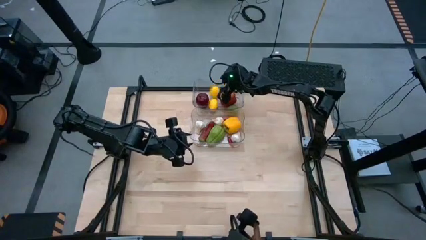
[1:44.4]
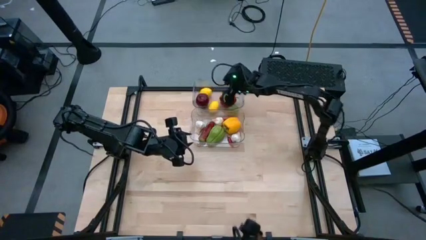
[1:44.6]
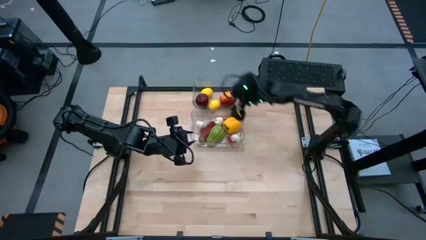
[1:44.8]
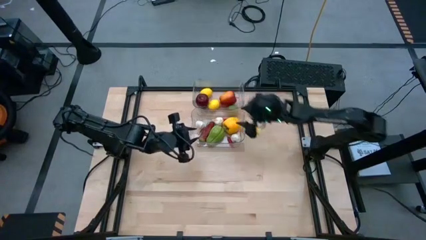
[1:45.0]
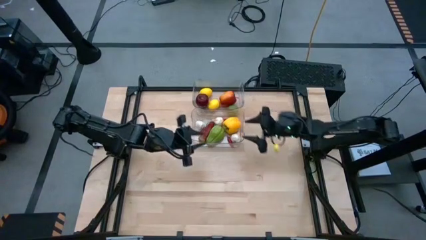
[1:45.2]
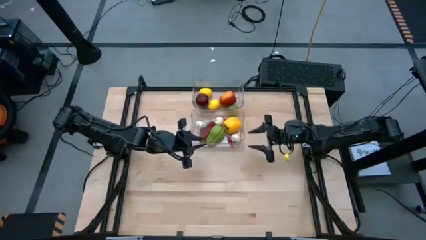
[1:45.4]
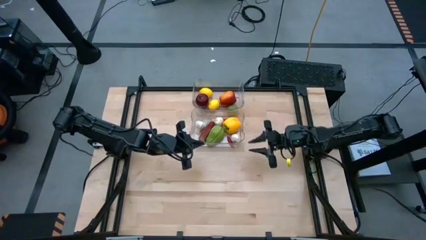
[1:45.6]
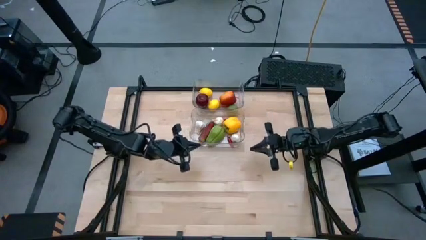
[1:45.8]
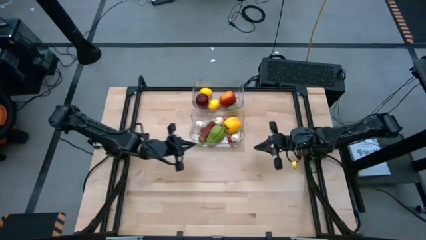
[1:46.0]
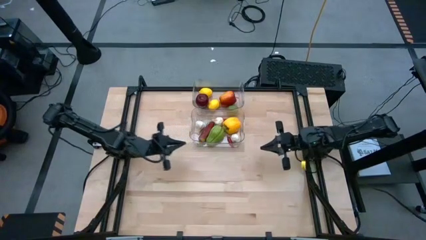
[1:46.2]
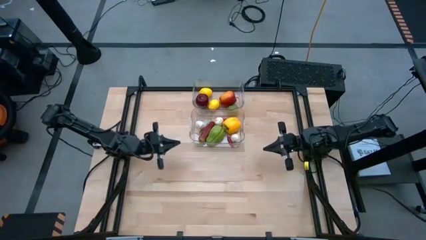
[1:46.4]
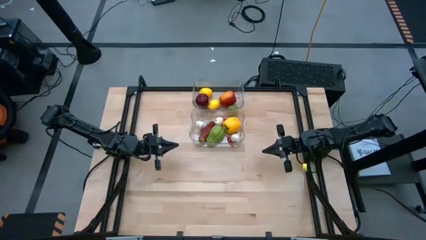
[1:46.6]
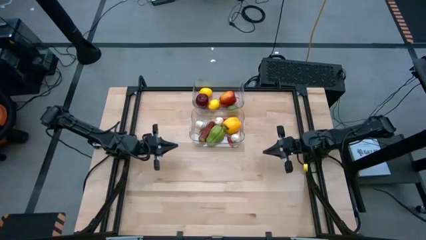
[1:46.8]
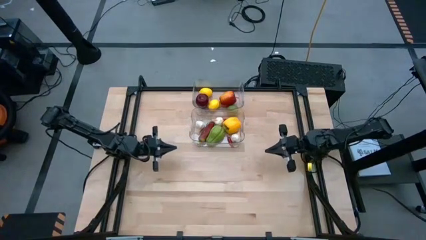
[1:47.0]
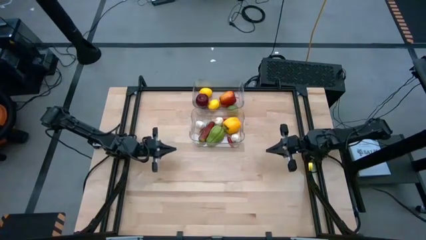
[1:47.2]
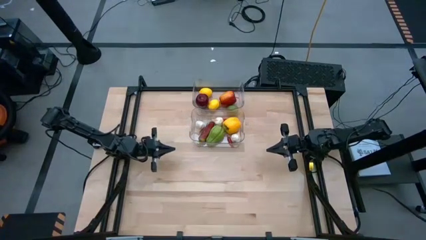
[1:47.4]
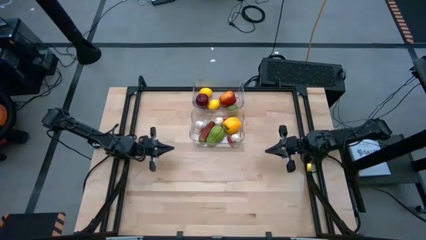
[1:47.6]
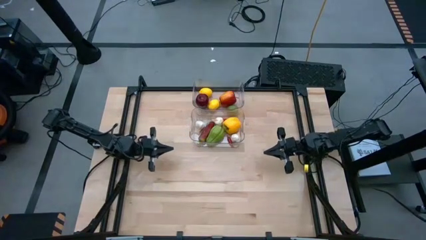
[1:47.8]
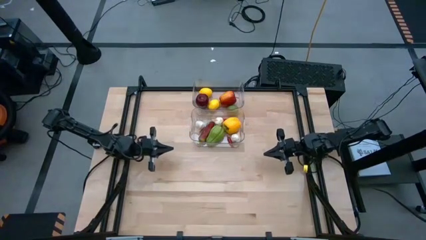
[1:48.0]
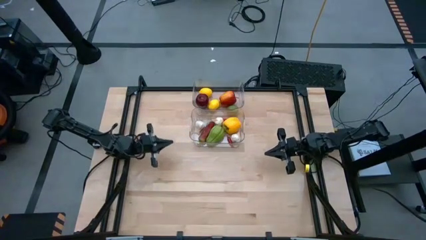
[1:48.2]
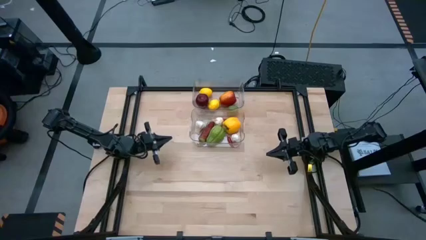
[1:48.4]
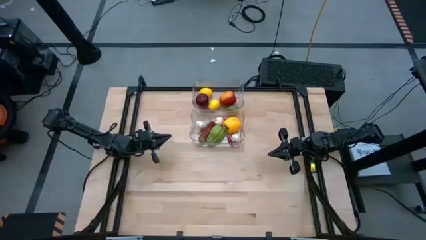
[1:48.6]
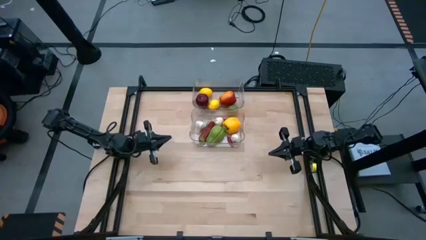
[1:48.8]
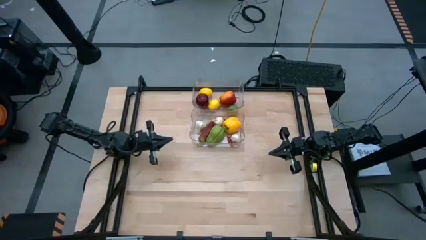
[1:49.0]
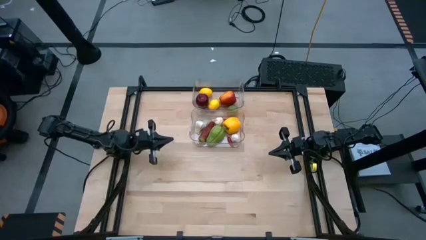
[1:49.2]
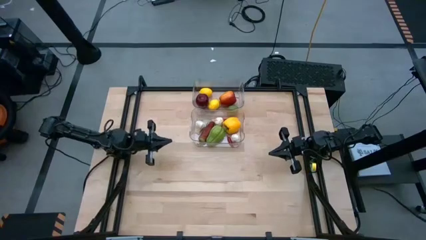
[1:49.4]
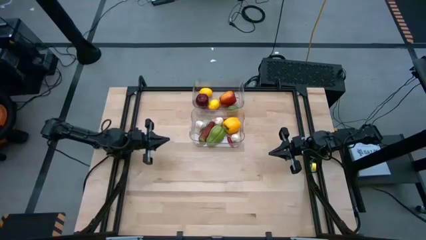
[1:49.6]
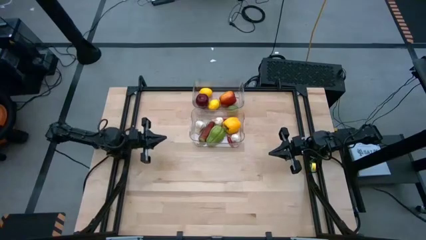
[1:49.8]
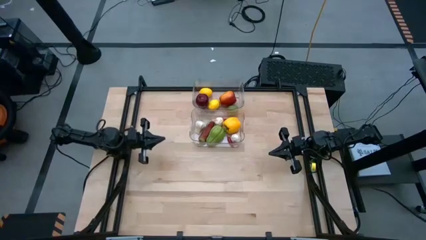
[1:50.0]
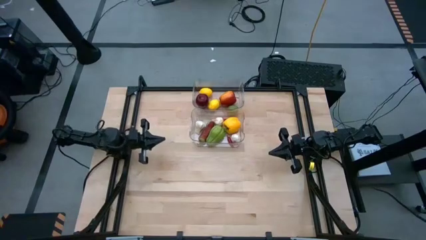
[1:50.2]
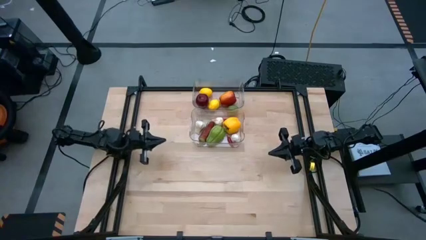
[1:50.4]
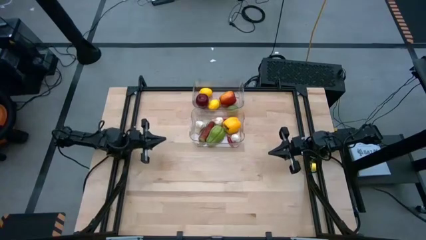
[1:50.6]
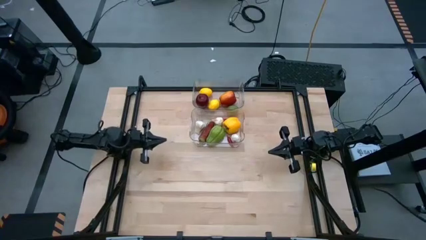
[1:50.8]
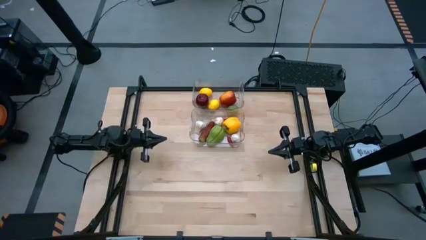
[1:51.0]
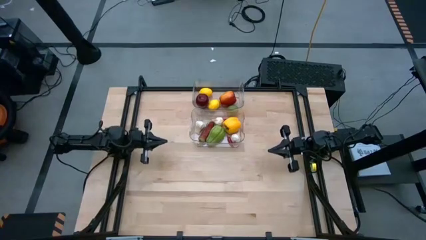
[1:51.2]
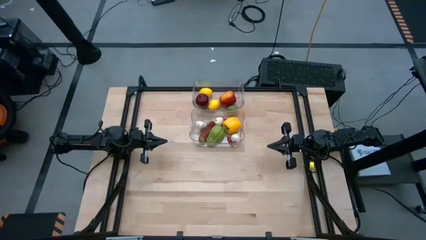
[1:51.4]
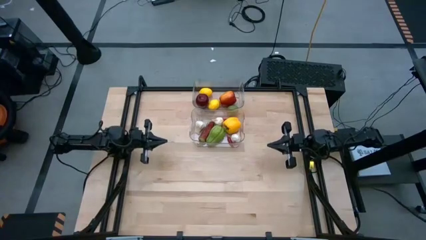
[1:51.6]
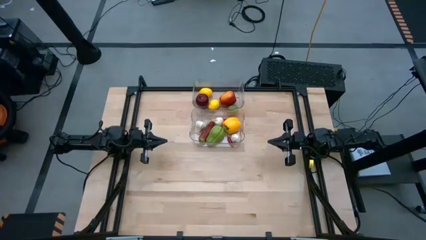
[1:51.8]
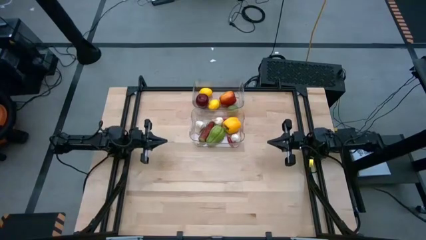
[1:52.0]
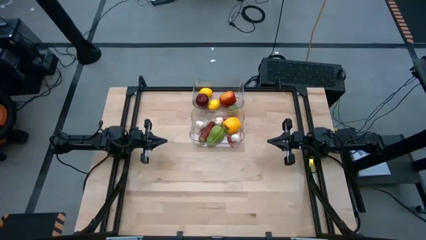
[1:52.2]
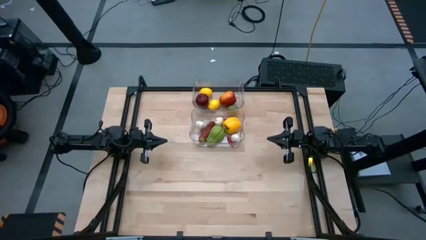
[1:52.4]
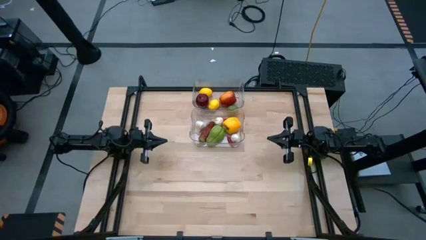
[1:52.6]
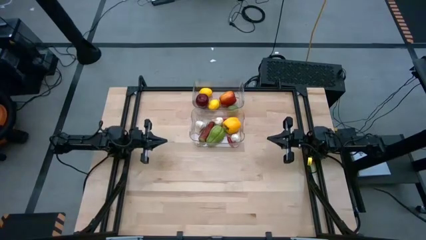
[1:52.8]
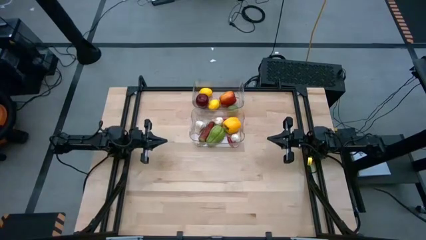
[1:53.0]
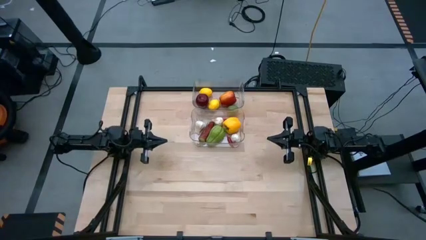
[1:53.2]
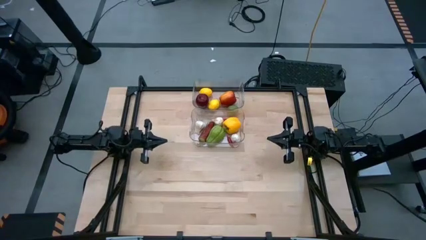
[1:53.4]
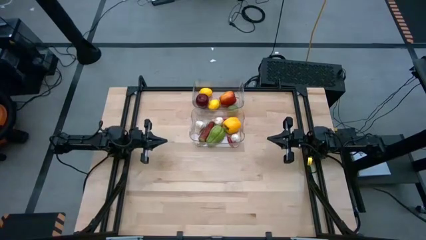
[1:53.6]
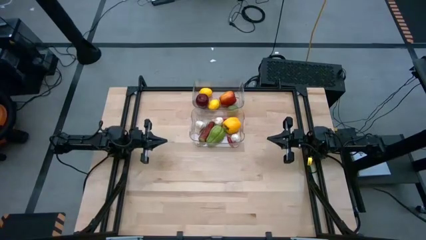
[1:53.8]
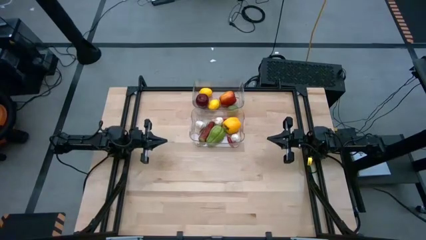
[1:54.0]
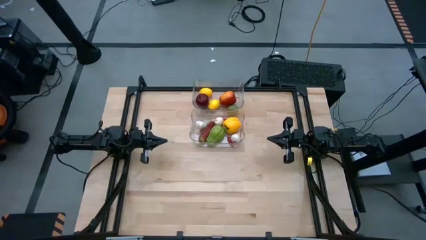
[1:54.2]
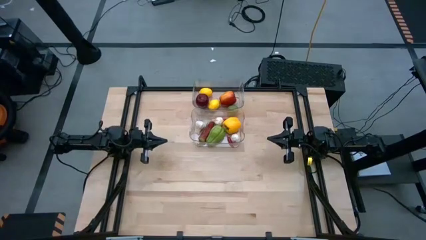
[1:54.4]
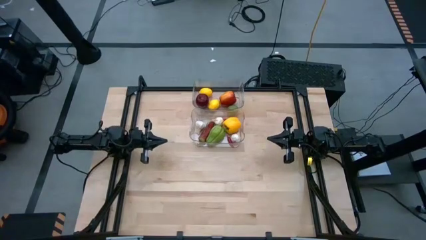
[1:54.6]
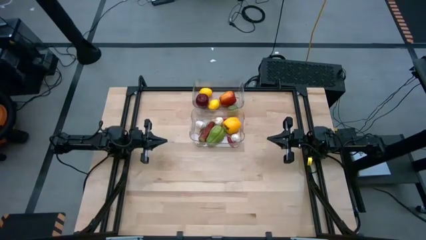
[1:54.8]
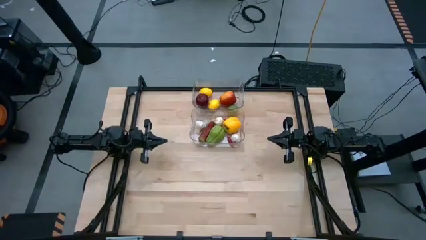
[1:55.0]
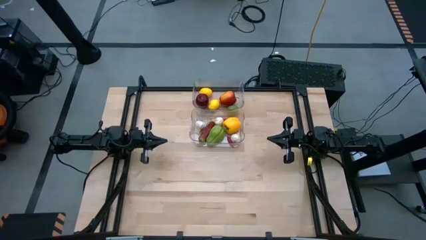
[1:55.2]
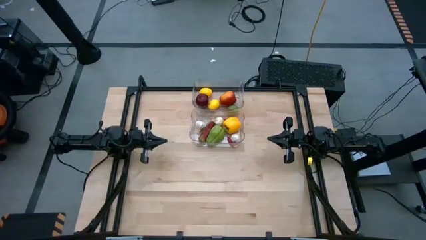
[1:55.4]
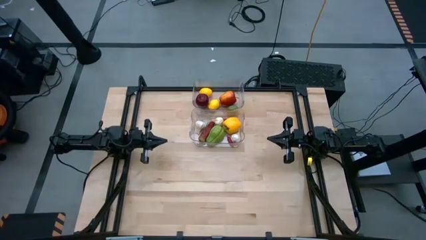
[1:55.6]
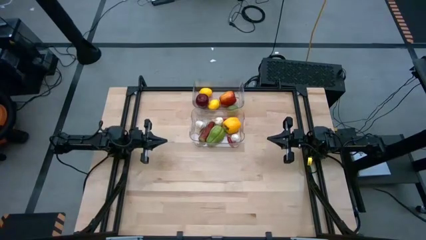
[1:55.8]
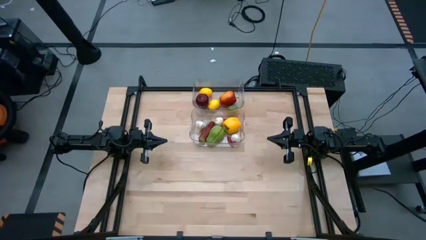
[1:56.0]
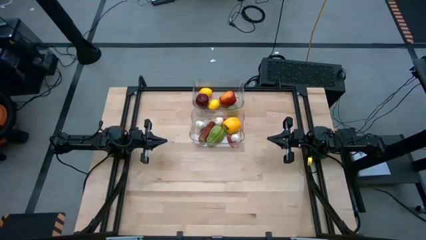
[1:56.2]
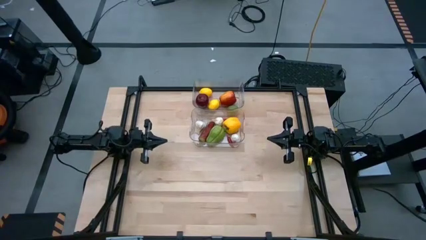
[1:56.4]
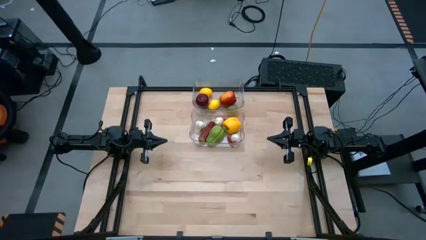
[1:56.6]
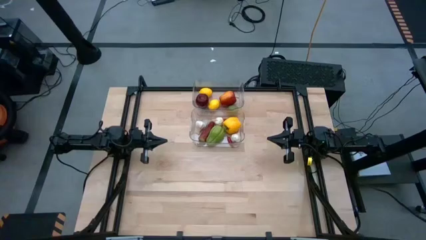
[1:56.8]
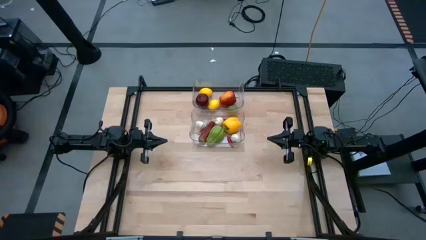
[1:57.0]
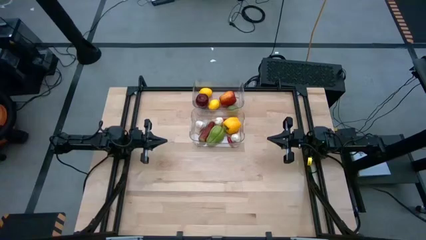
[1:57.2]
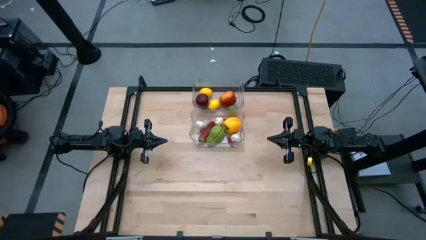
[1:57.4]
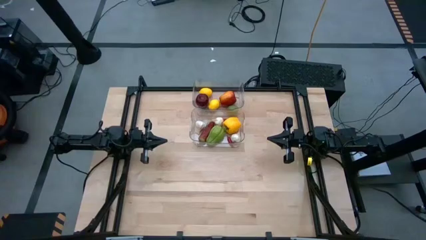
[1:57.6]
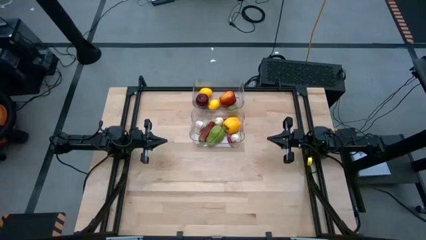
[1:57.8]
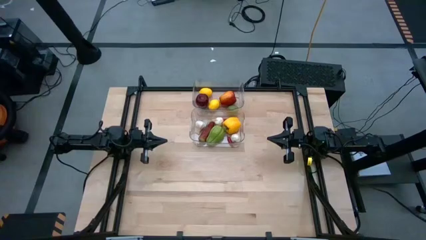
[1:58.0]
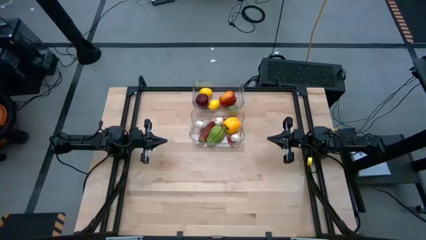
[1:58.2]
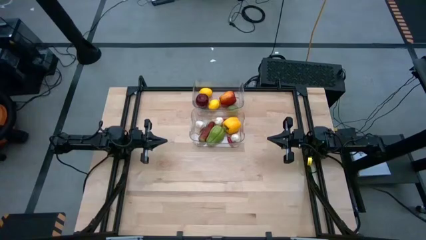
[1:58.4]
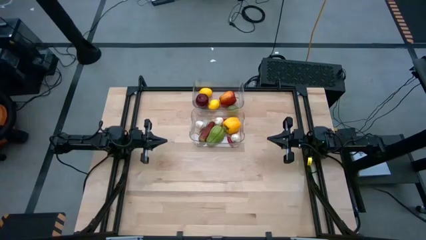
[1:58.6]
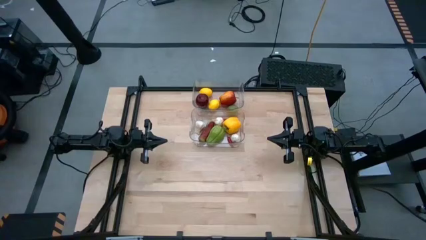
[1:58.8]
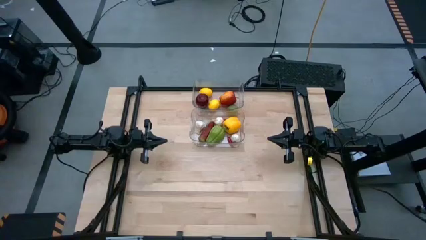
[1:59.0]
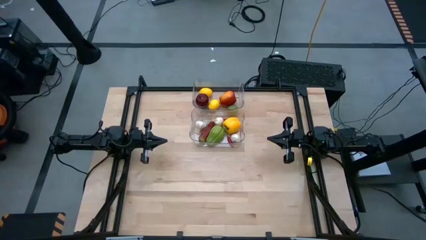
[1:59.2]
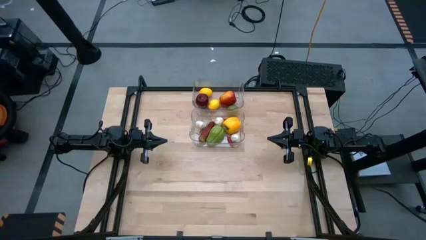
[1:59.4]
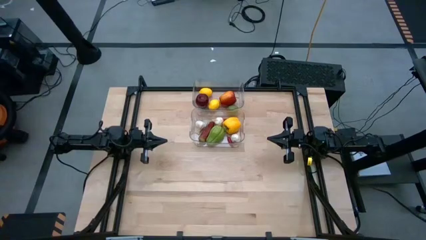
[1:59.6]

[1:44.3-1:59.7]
Task: Sort produce into baskets
Return to Home Position
